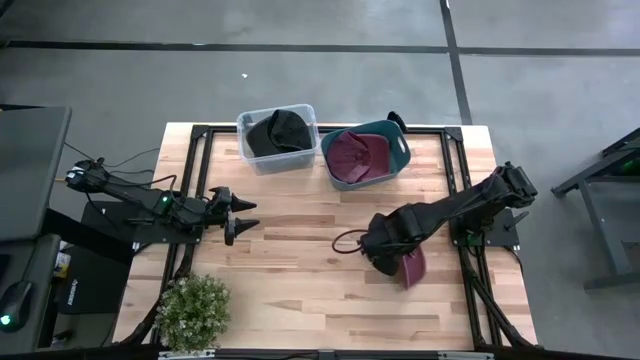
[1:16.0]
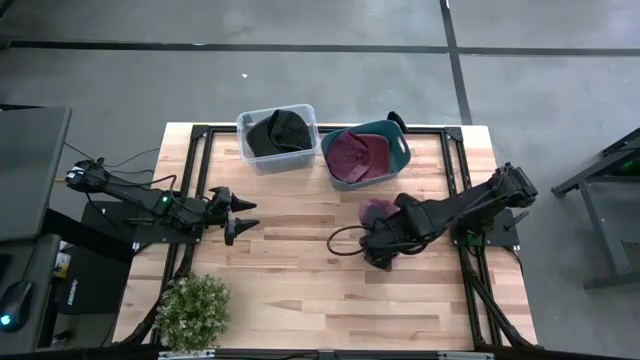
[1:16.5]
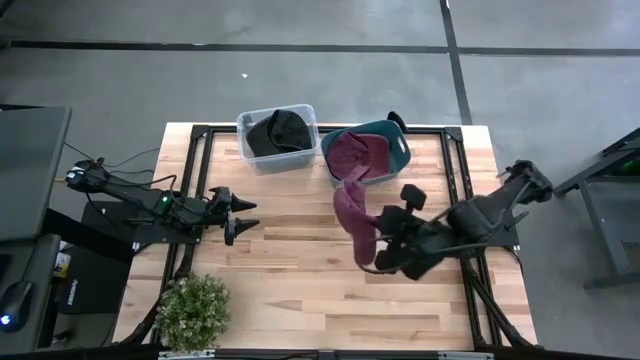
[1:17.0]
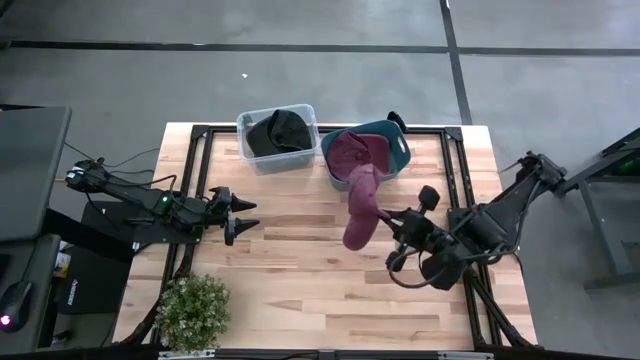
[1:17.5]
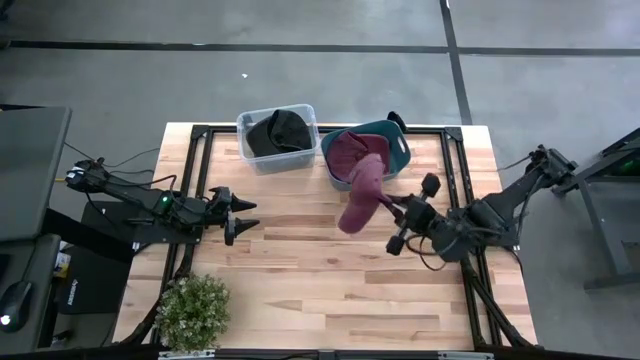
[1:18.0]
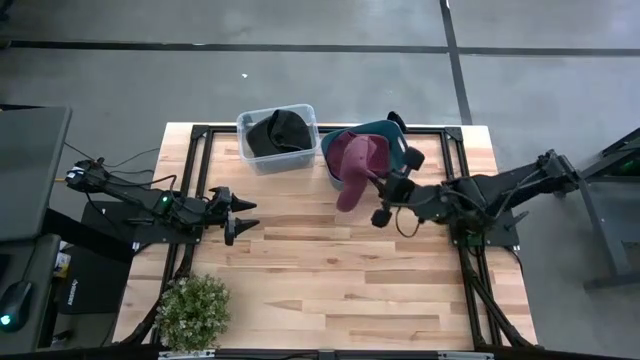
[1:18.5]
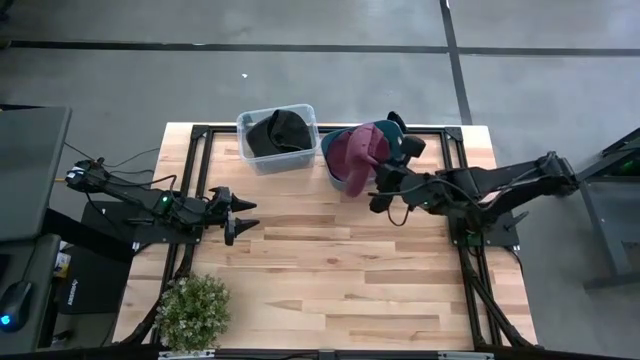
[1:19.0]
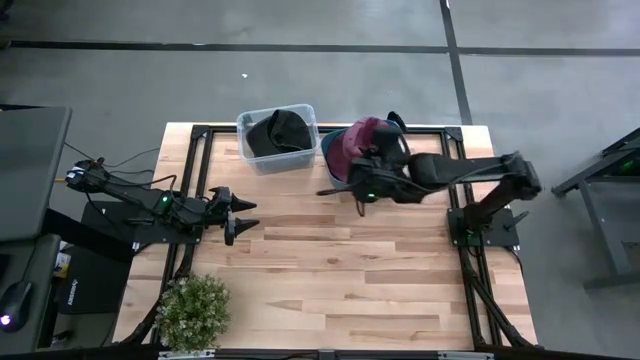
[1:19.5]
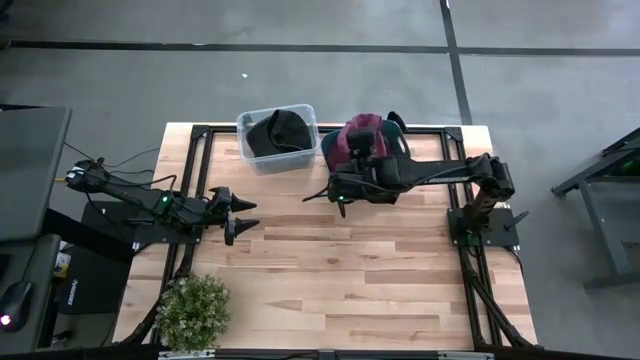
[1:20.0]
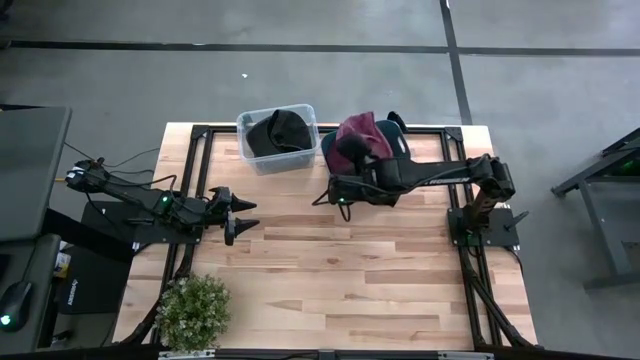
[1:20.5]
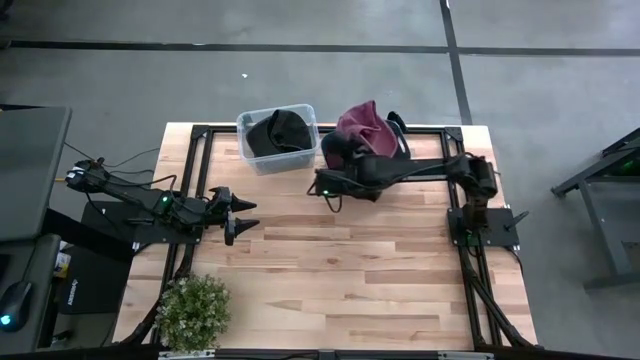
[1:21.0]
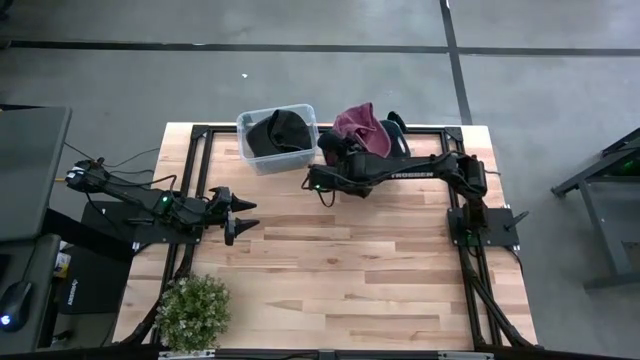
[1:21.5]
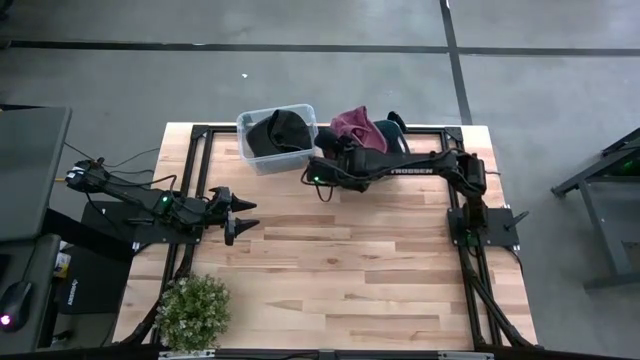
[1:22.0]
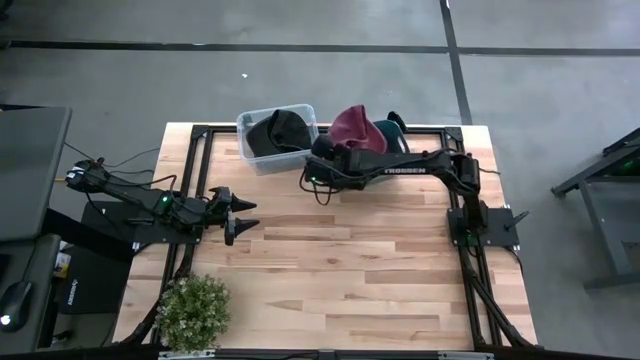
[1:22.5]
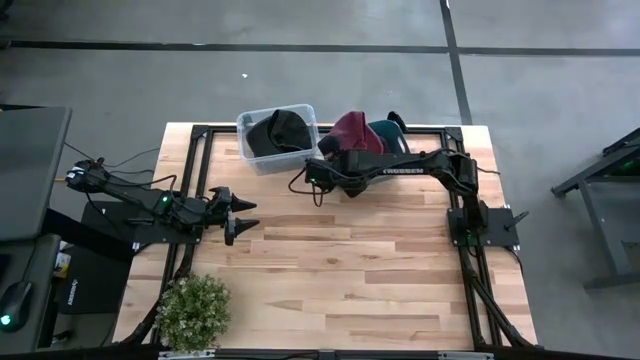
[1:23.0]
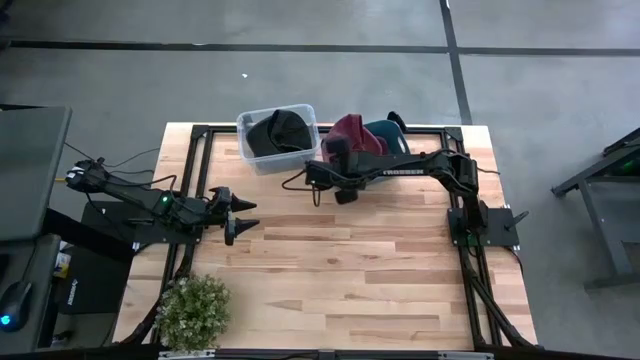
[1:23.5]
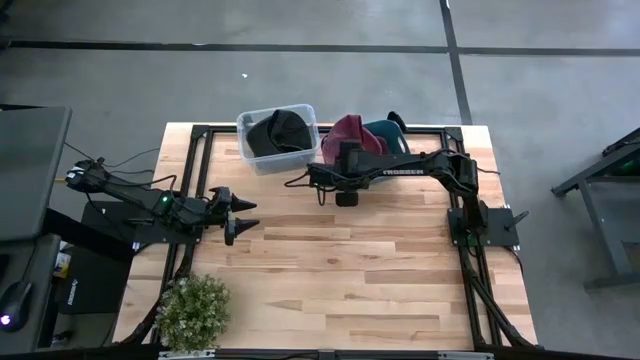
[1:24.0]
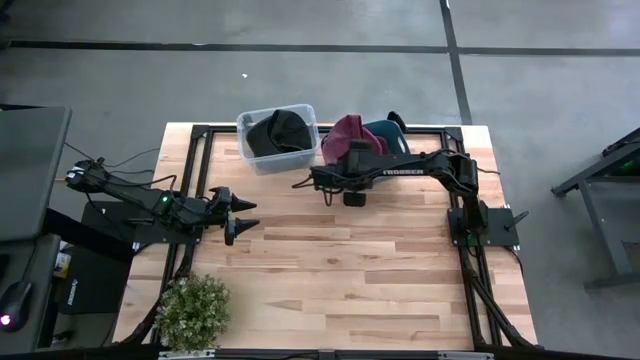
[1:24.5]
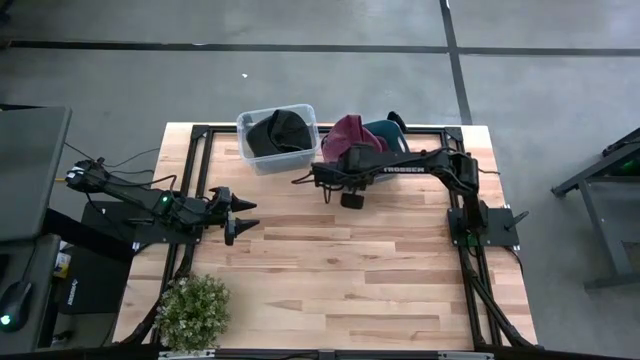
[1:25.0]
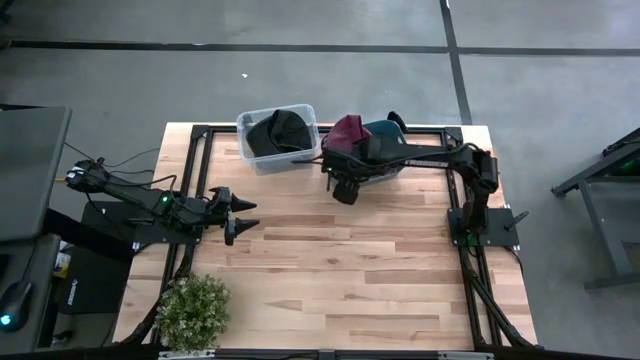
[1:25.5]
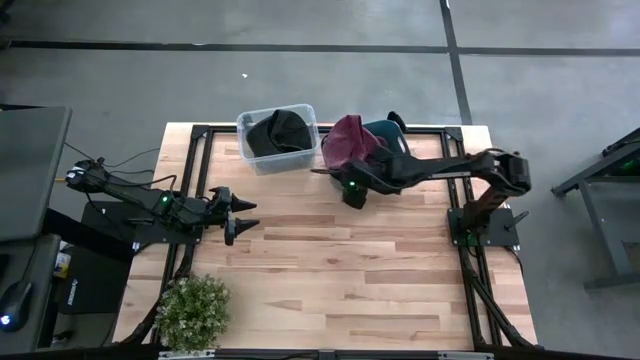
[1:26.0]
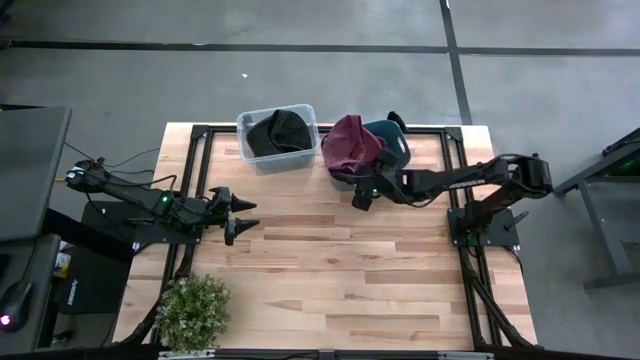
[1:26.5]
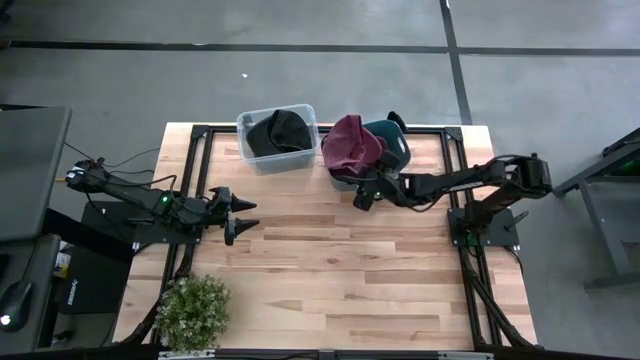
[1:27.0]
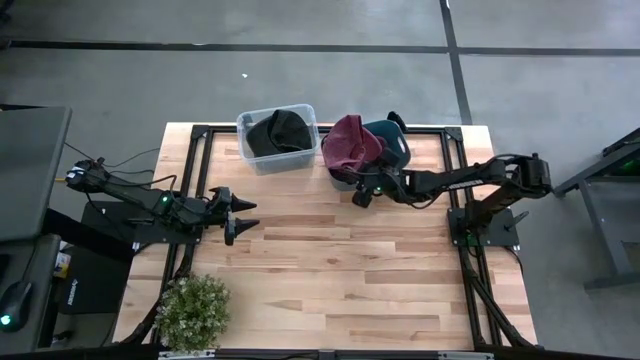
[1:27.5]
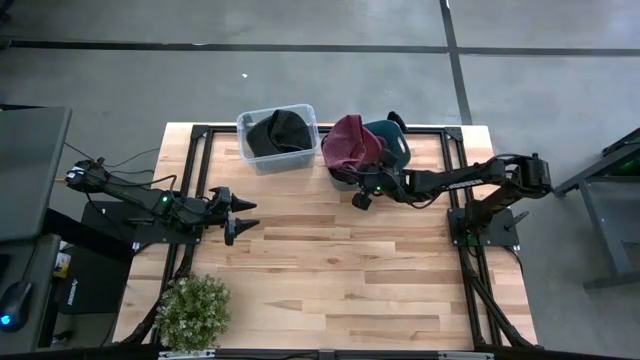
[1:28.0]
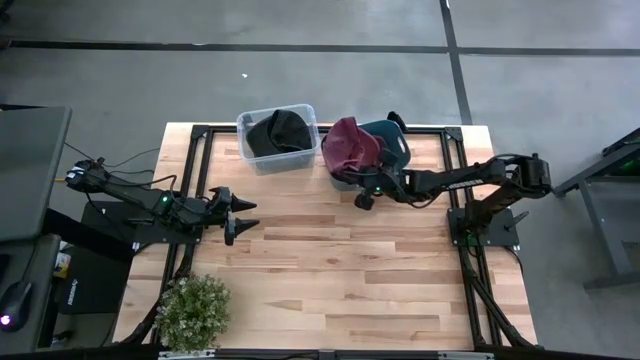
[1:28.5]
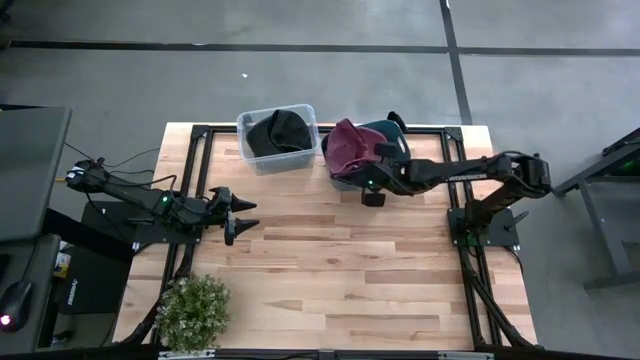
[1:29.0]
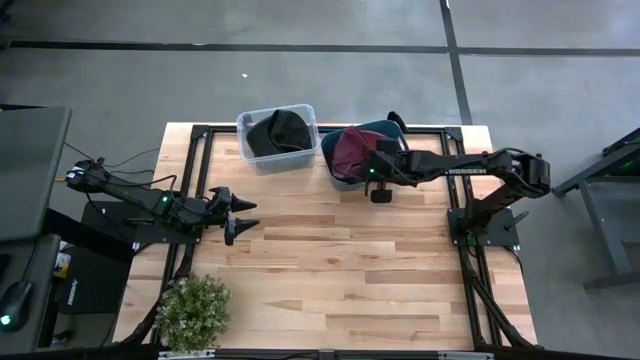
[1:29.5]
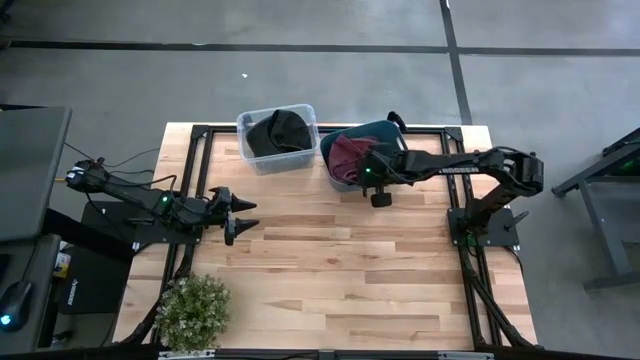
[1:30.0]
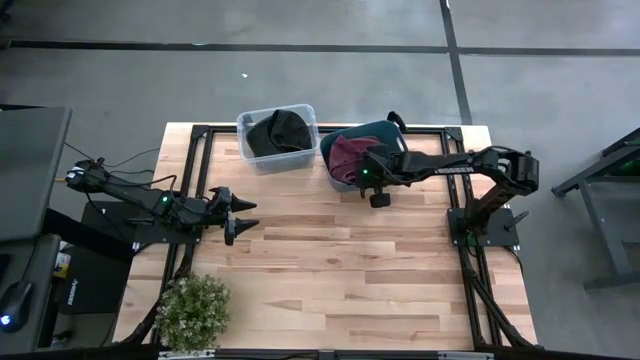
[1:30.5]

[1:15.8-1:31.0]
Task: Pick & Place hat
Put the red cap into the blue bin

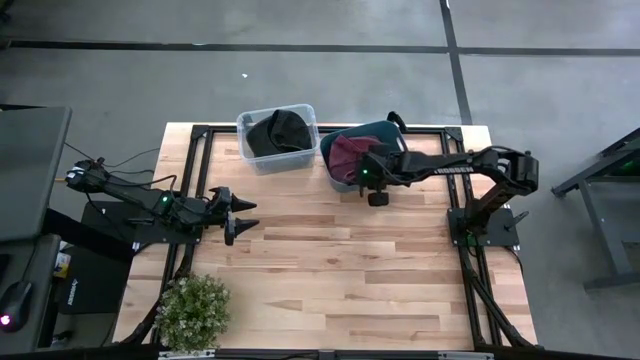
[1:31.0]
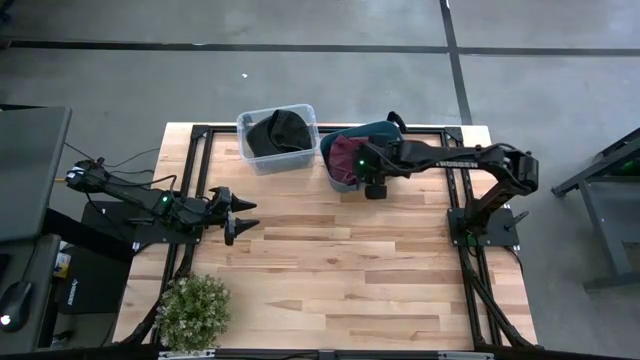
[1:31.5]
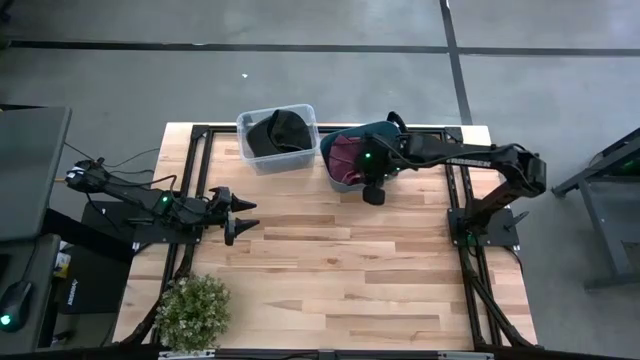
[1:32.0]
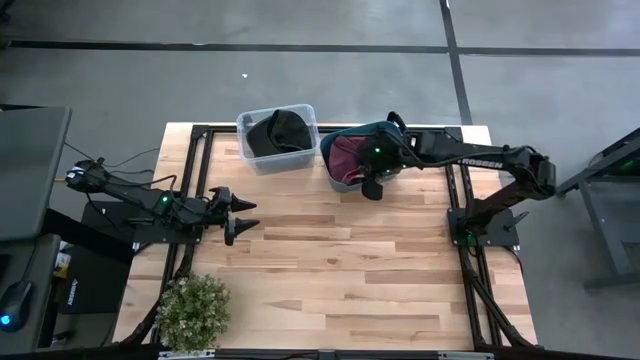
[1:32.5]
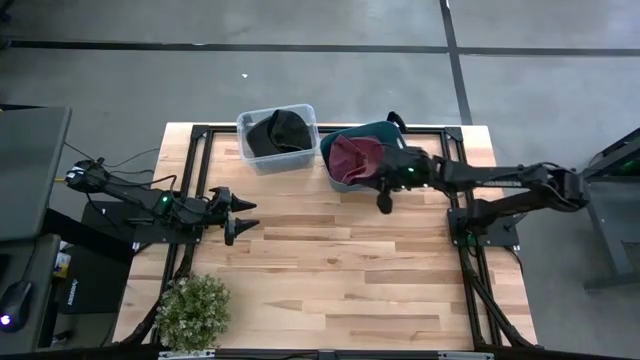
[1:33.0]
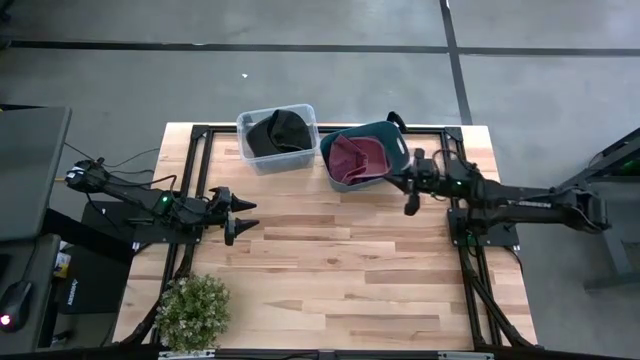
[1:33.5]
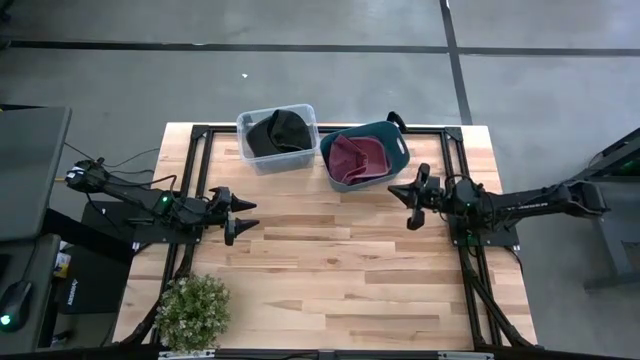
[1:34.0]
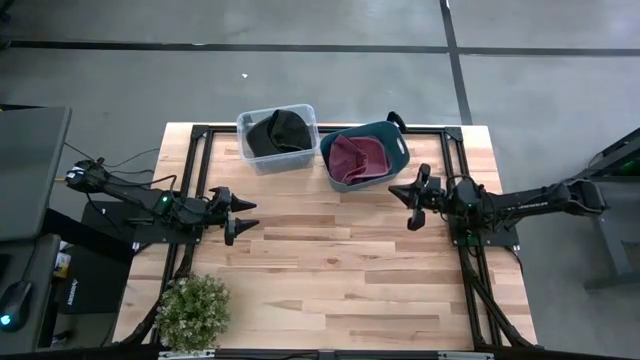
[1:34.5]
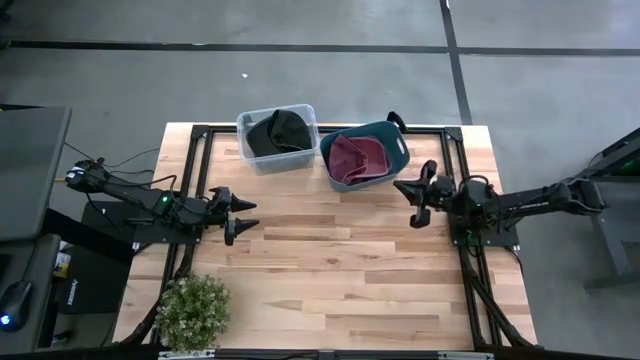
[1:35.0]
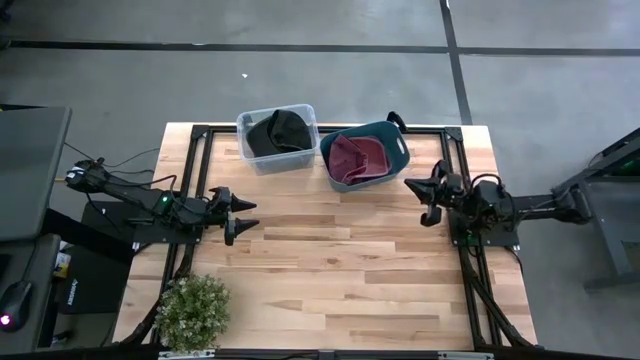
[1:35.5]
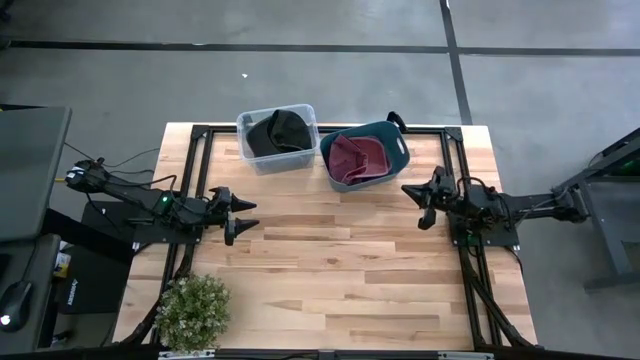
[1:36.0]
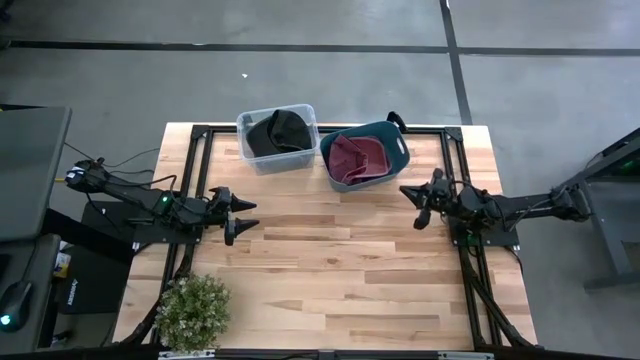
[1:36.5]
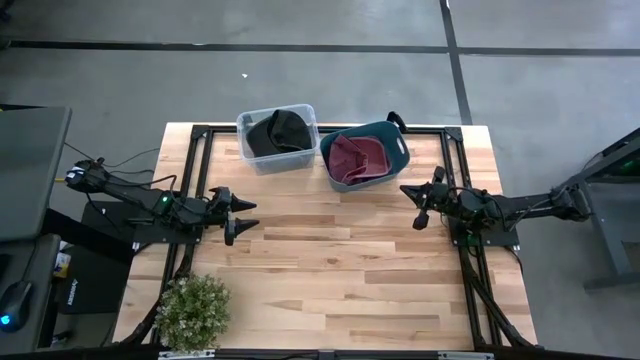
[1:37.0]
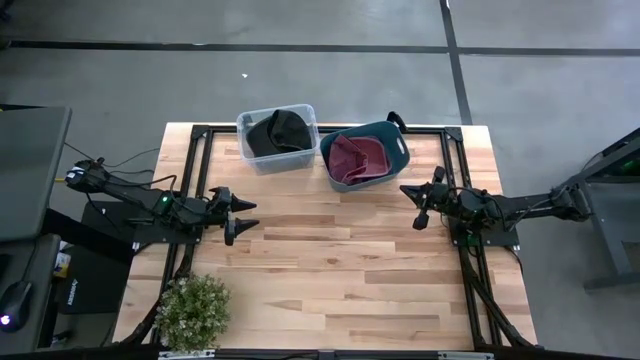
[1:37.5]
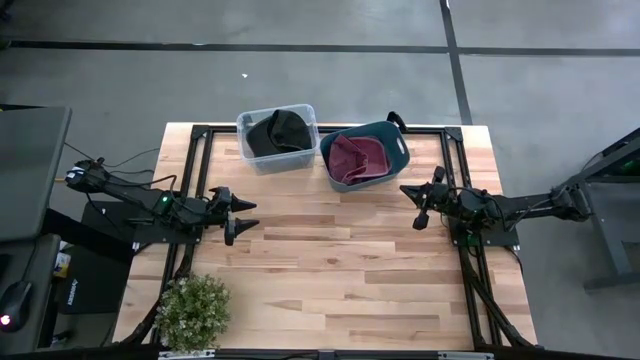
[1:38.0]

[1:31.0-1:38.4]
Return to Home Position
